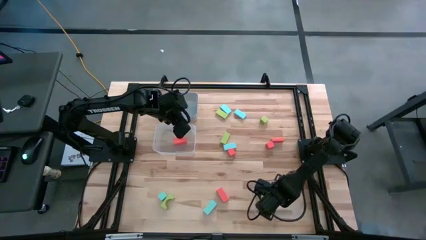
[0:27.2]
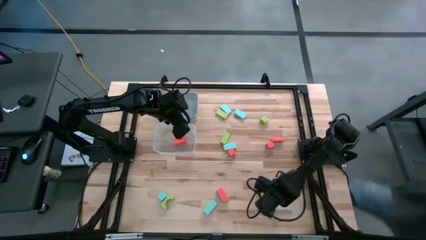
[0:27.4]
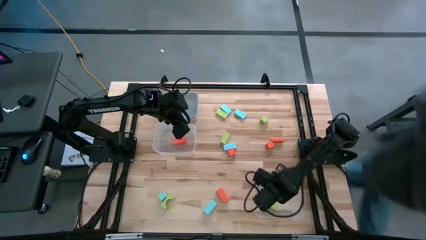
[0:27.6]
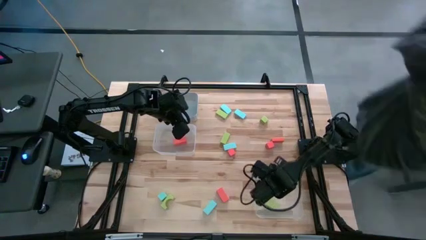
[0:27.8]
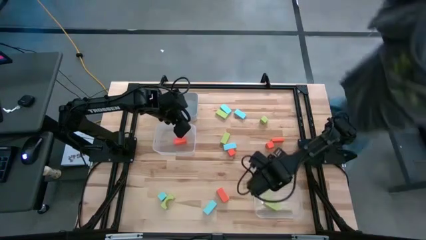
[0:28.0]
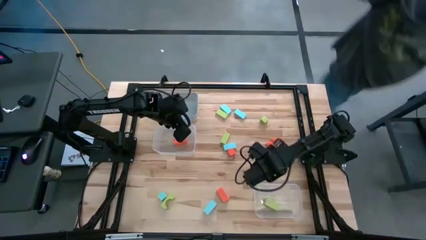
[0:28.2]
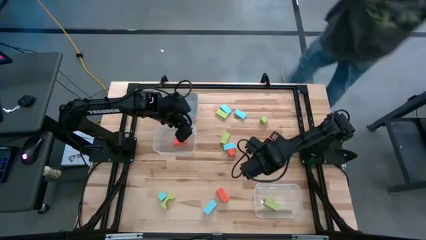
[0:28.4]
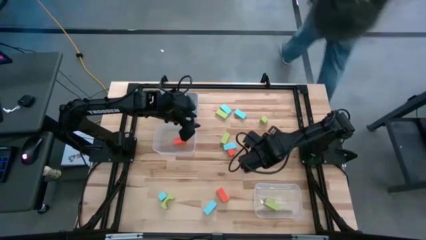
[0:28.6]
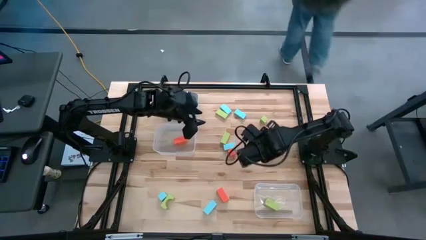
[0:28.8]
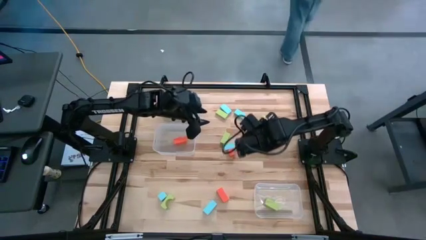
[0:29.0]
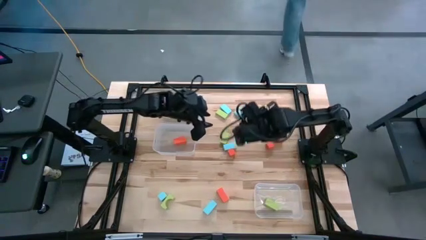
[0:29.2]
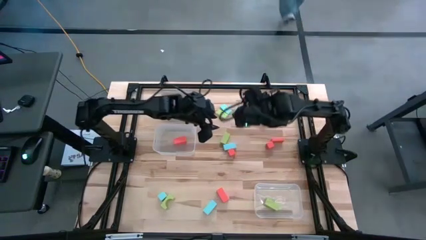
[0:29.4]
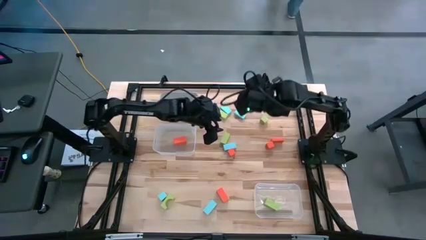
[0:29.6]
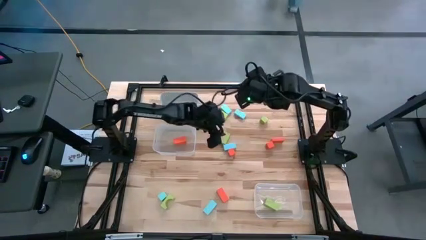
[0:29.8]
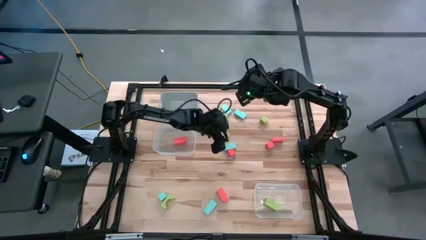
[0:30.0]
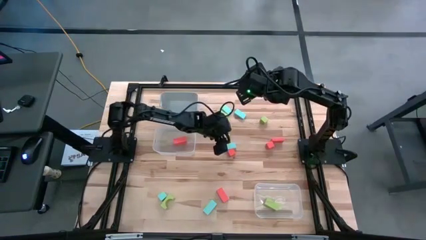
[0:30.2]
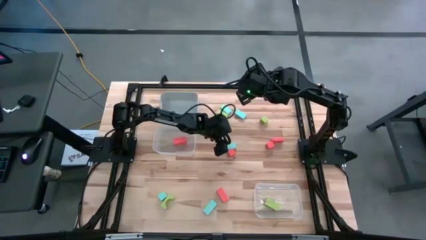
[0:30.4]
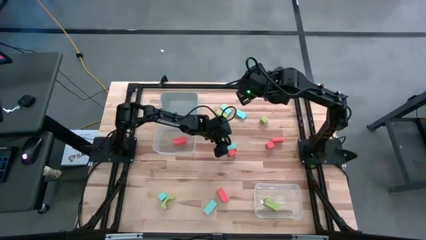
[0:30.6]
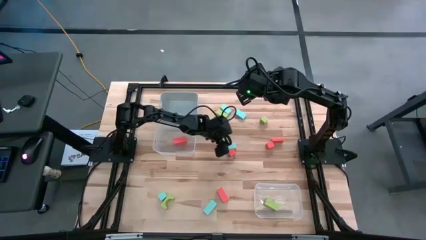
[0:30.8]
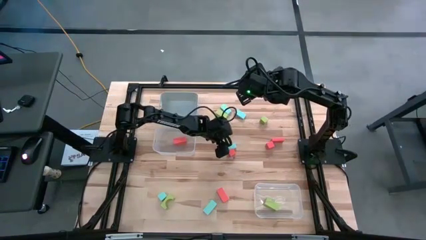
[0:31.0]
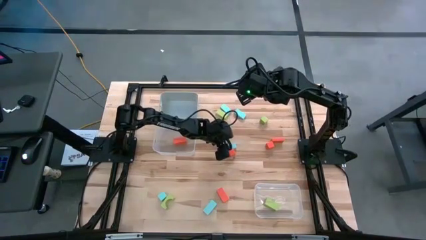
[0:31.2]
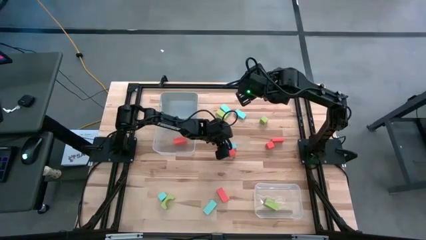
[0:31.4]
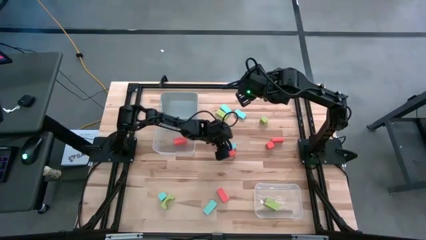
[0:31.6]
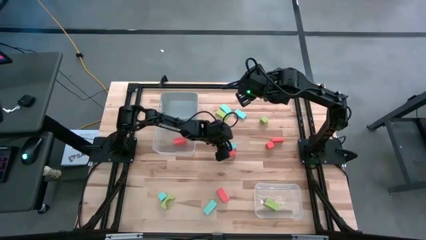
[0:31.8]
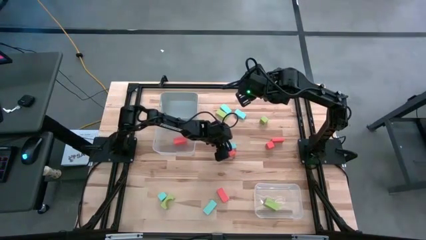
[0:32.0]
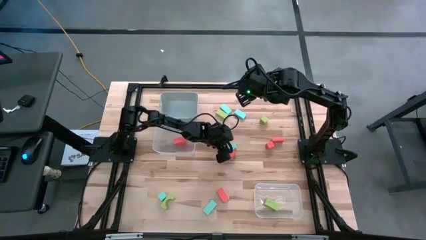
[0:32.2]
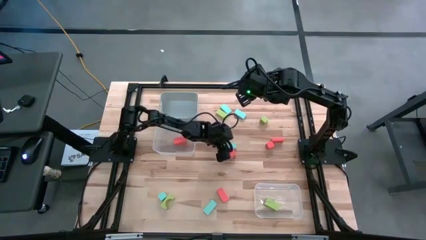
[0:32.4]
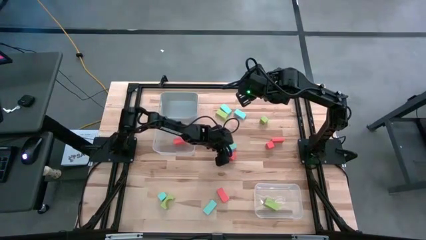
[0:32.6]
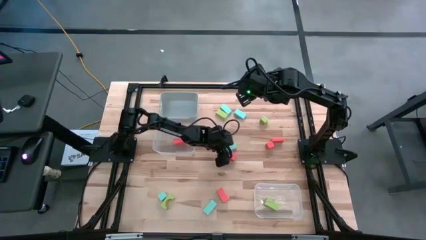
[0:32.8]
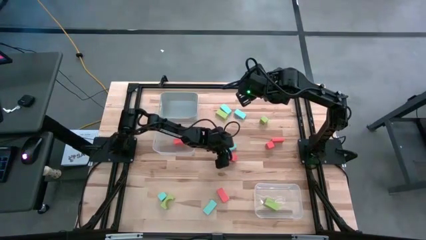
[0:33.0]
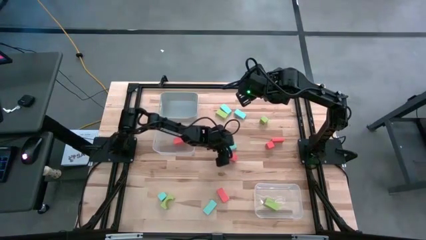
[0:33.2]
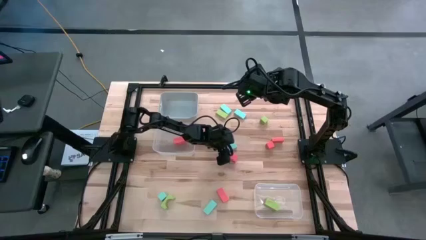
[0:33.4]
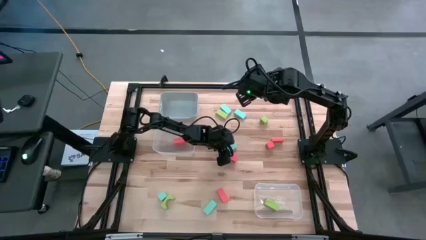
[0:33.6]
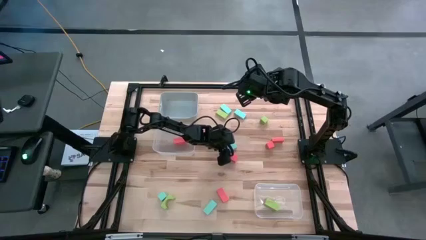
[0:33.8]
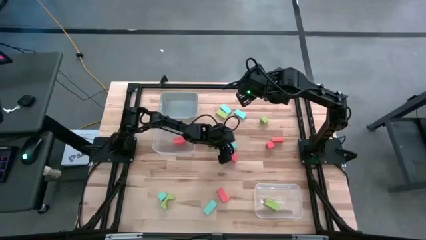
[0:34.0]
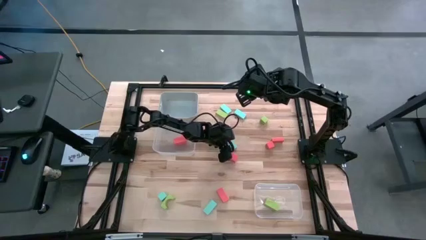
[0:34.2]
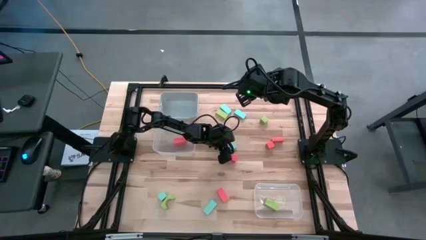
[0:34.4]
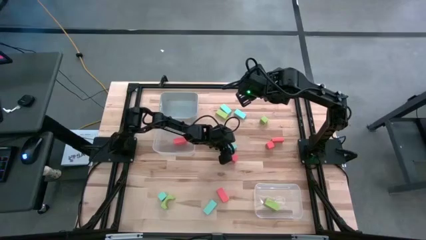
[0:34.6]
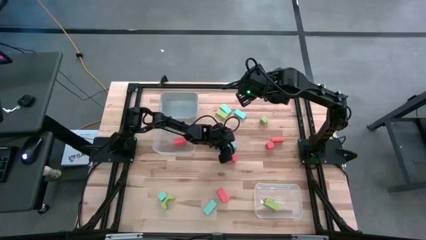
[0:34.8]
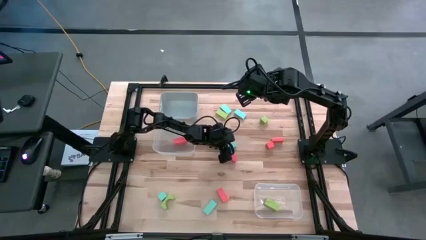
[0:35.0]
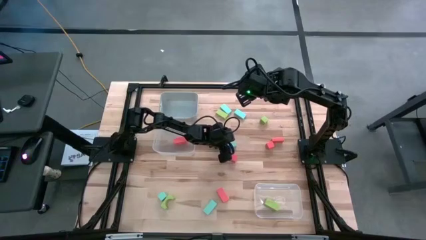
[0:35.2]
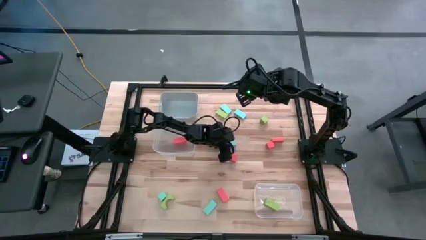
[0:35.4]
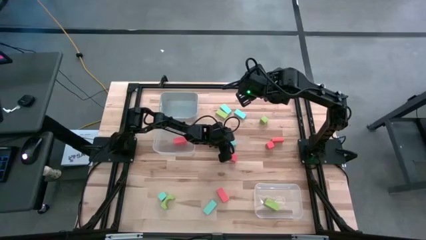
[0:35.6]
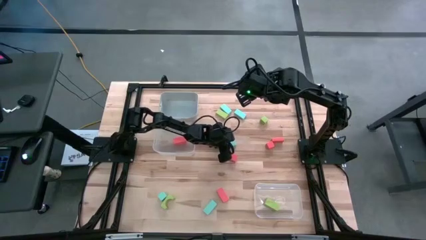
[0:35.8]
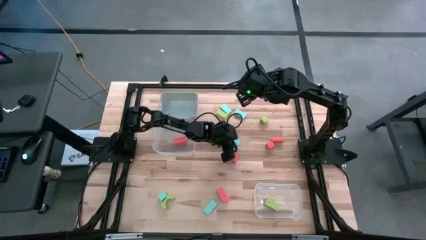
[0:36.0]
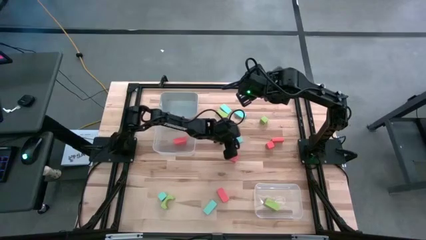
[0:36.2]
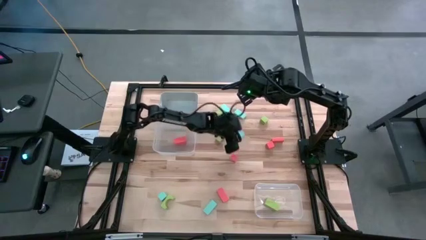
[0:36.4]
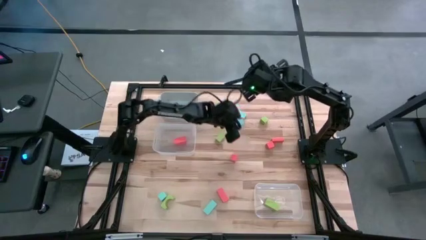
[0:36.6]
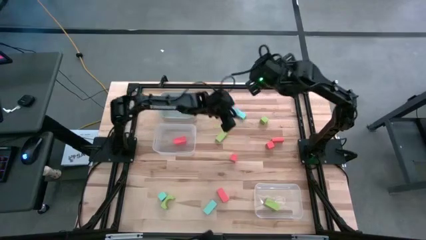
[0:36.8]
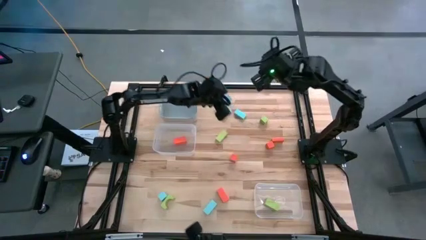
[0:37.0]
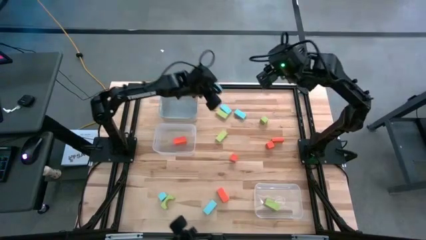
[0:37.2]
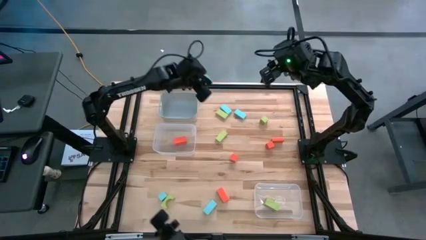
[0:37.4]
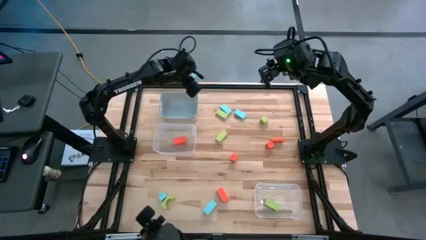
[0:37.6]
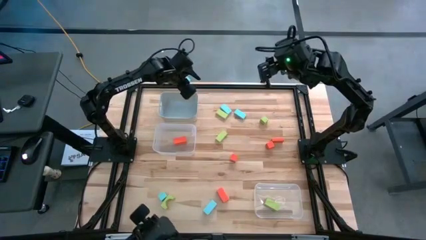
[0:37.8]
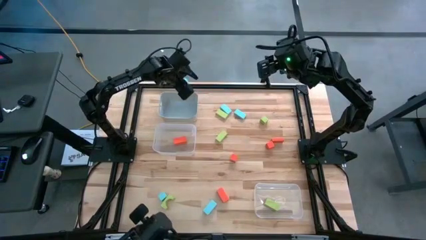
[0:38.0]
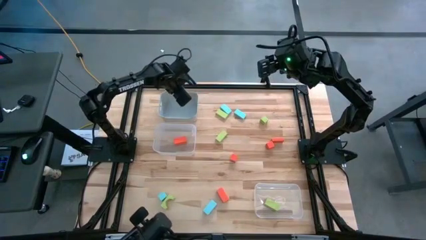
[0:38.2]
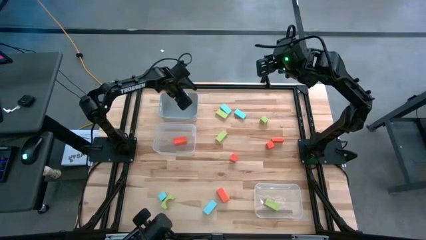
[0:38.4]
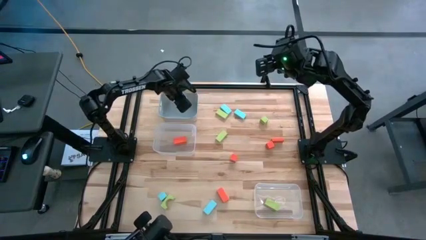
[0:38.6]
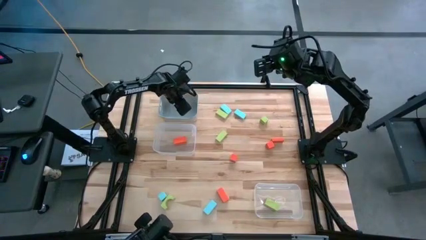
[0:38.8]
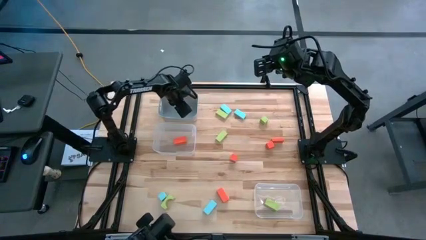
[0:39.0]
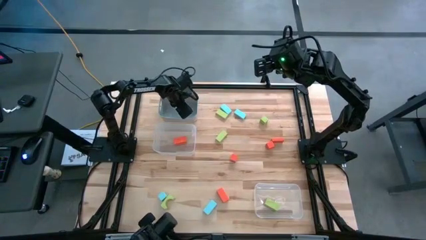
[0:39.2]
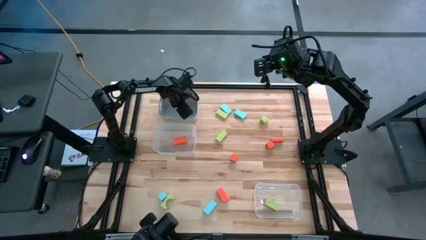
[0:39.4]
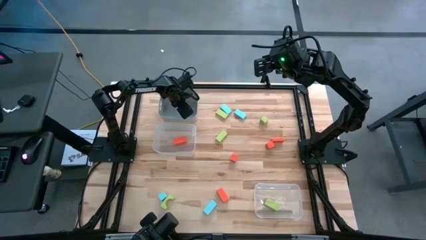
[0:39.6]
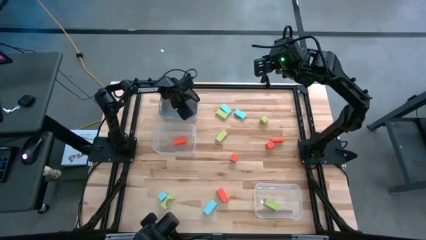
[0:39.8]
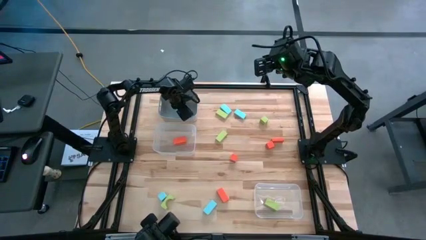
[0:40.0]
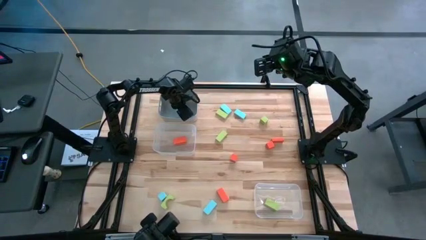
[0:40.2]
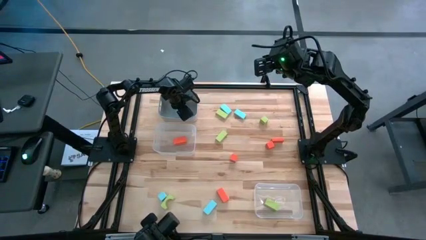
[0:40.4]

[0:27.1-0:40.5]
Task: Sort & place blocks by color
Put the blue block into the gray bin

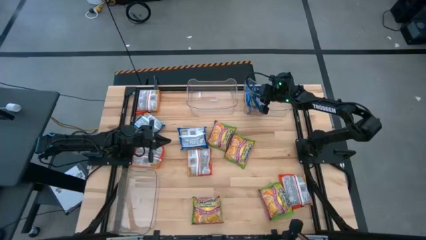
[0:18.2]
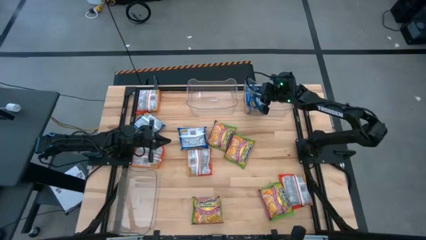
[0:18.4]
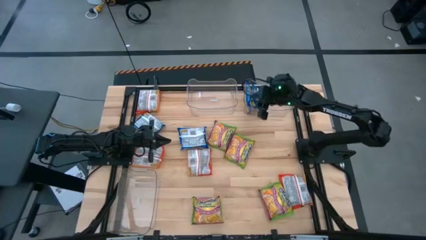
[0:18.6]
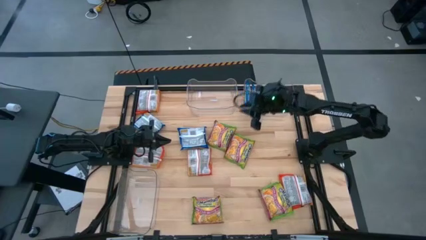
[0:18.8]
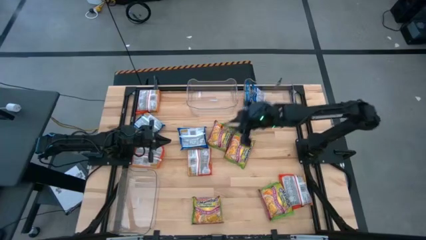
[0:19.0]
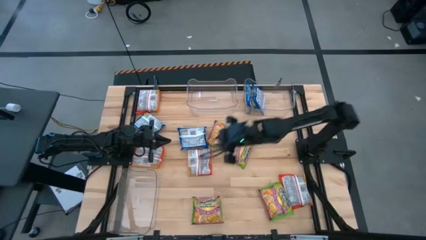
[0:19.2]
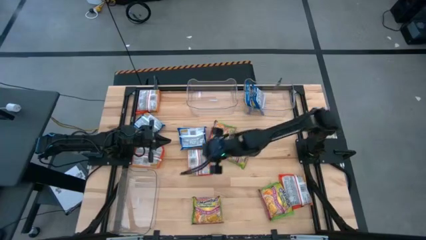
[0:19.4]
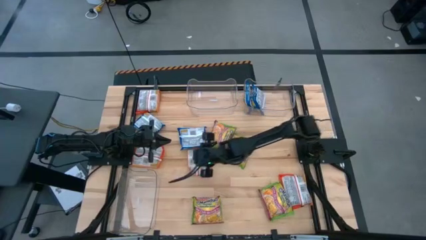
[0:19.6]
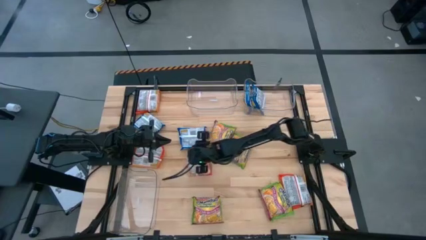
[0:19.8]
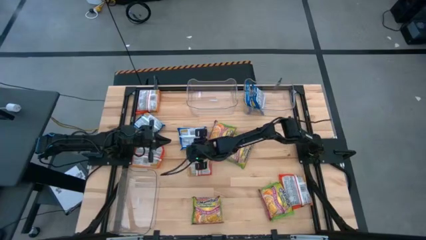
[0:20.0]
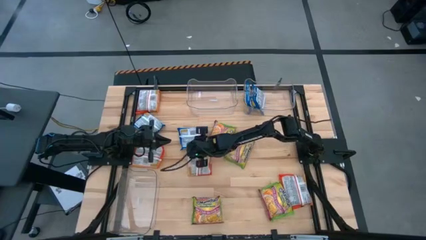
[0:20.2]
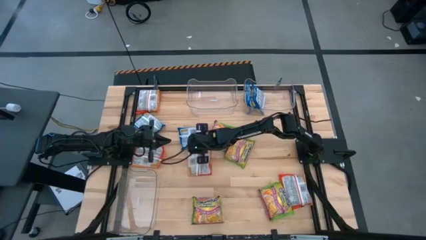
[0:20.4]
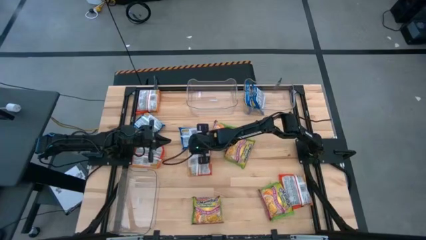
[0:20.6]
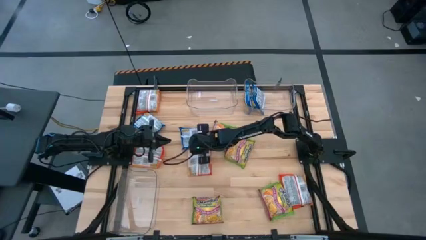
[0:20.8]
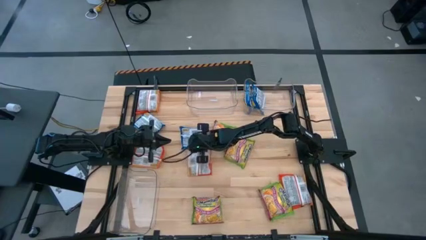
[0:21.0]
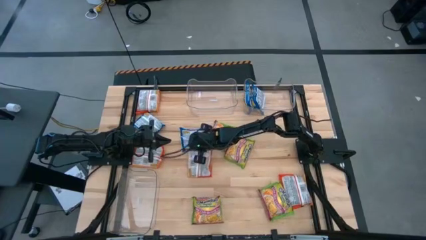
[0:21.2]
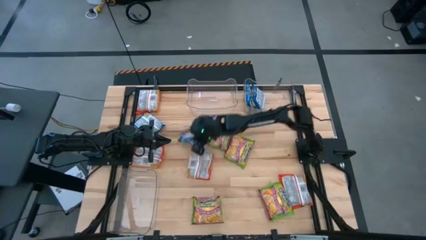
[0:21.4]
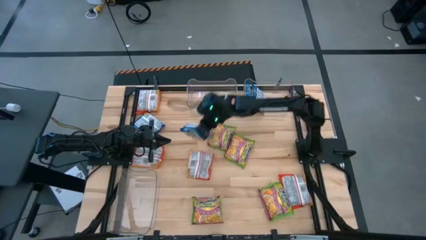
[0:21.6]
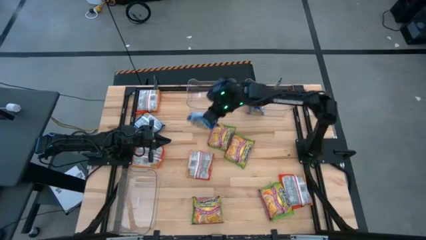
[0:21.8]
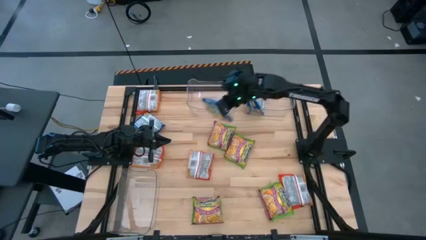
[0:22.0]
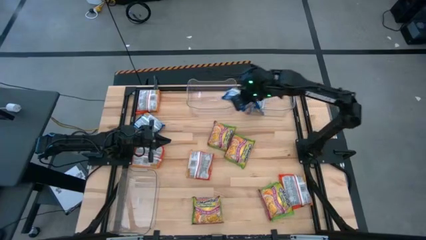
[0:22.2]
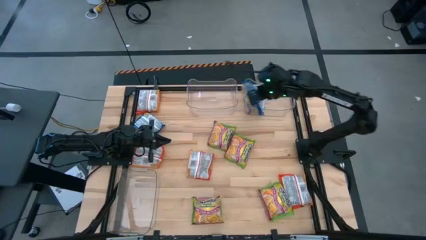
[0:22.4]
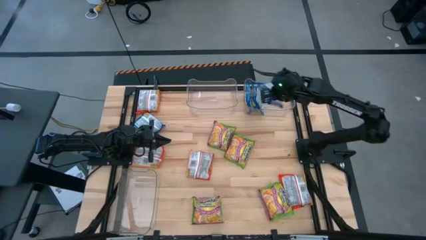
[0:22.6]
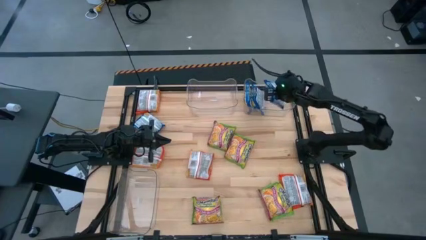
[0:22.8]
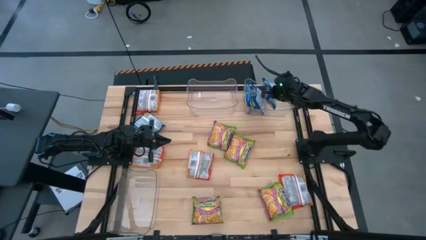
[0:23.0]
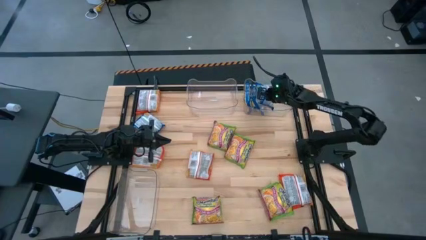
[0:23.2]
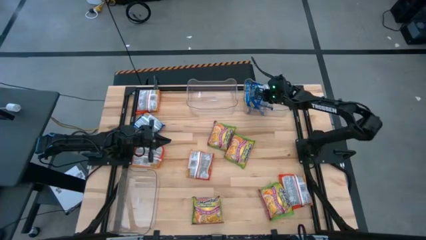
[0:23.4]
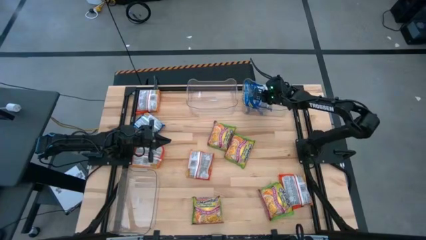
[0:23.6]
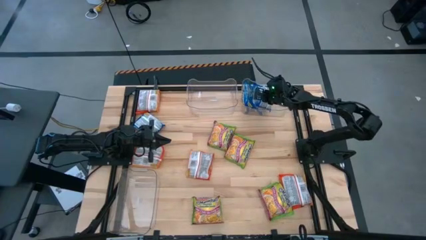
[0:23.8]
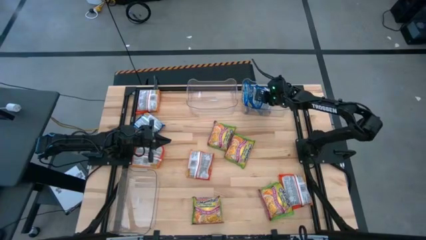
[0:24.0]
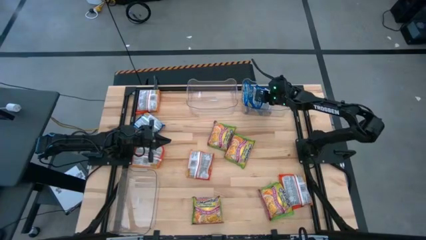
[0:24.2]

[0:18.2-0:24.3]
Task: Sort Maruchan noodles
Put the blue noodle pack into the top right transparent bin
